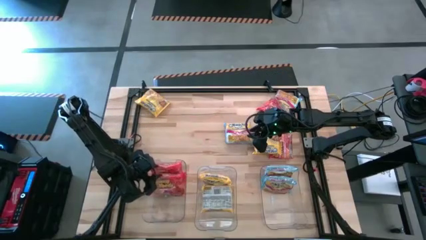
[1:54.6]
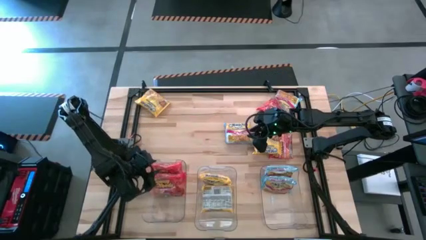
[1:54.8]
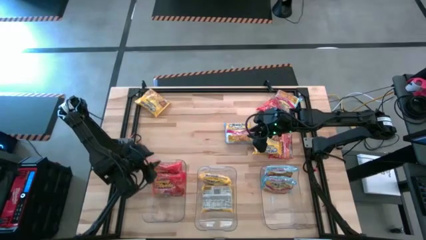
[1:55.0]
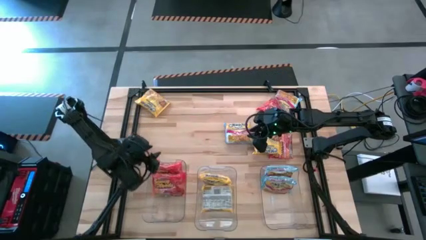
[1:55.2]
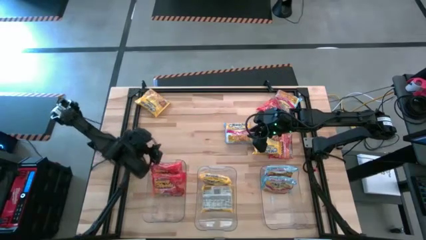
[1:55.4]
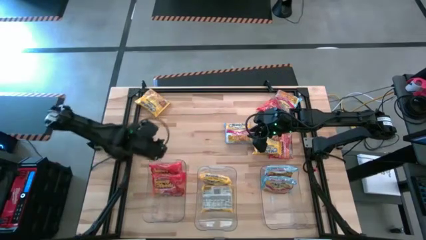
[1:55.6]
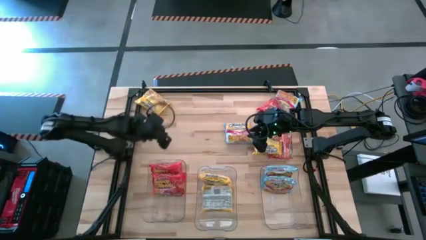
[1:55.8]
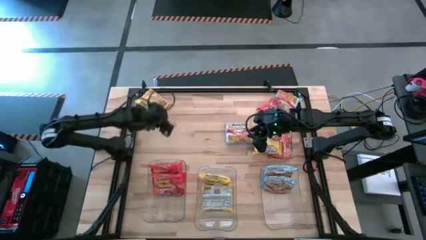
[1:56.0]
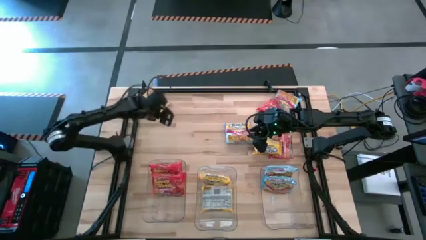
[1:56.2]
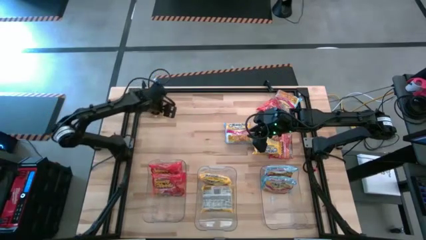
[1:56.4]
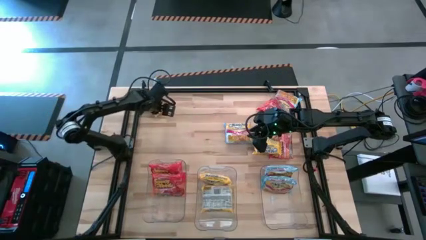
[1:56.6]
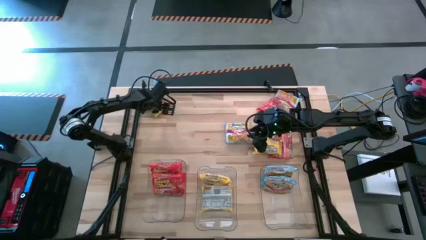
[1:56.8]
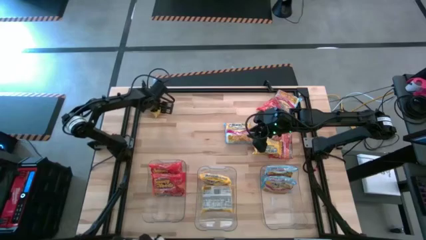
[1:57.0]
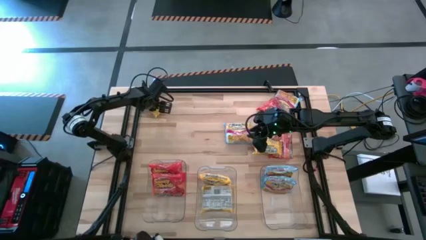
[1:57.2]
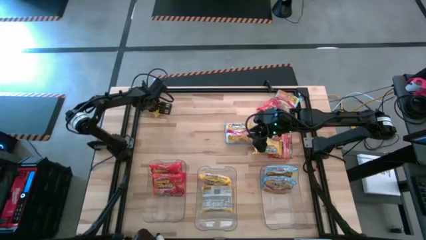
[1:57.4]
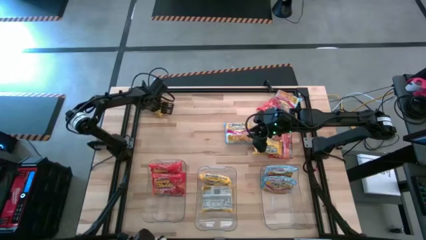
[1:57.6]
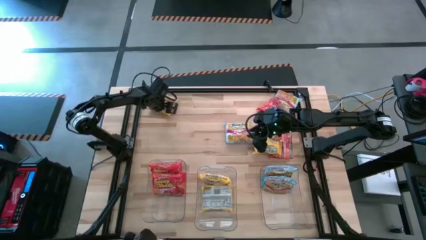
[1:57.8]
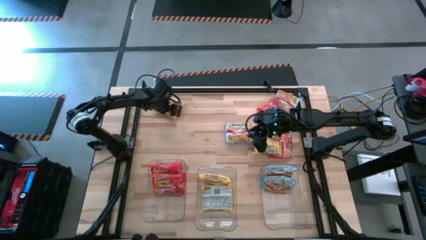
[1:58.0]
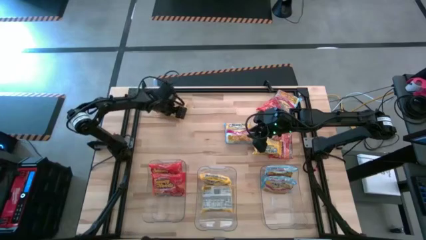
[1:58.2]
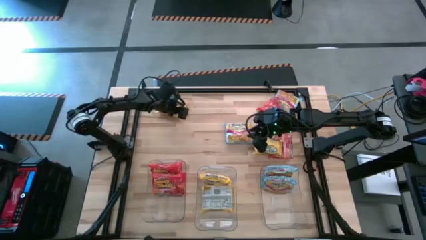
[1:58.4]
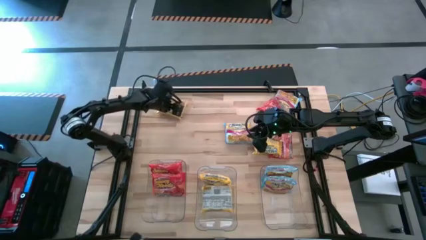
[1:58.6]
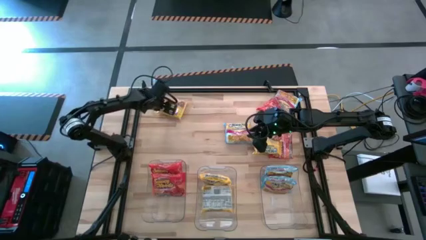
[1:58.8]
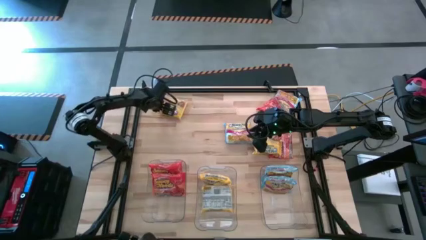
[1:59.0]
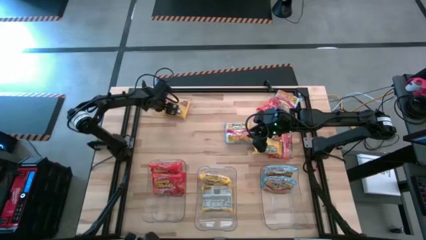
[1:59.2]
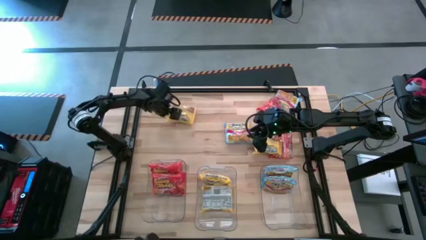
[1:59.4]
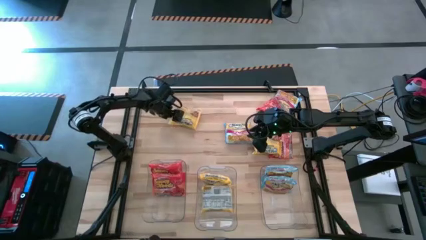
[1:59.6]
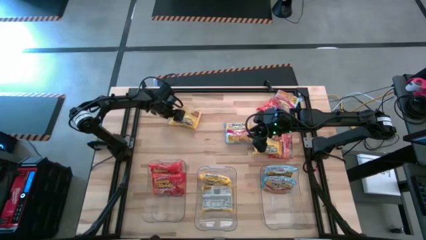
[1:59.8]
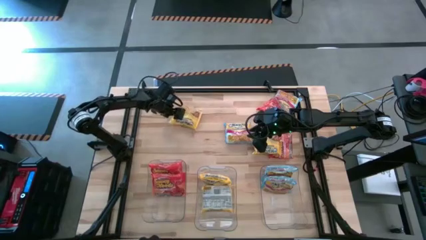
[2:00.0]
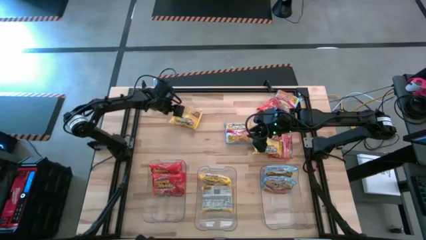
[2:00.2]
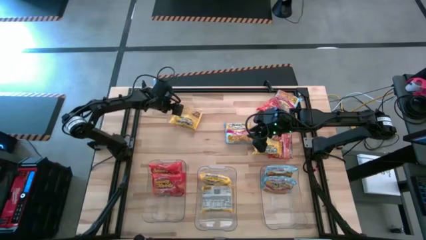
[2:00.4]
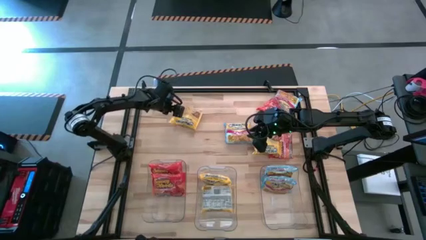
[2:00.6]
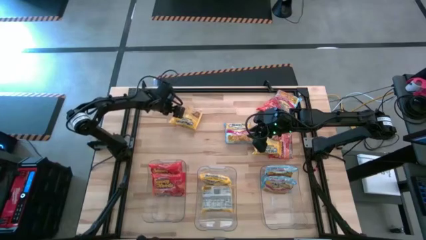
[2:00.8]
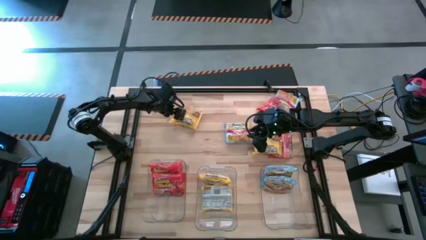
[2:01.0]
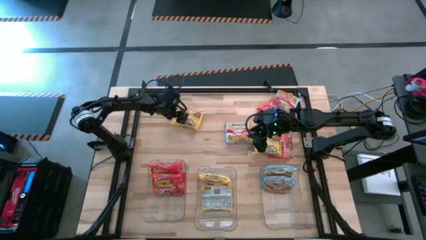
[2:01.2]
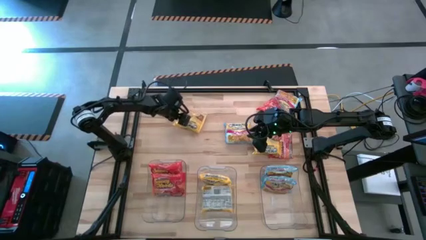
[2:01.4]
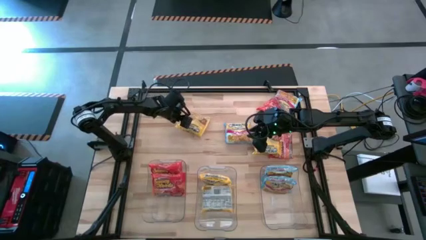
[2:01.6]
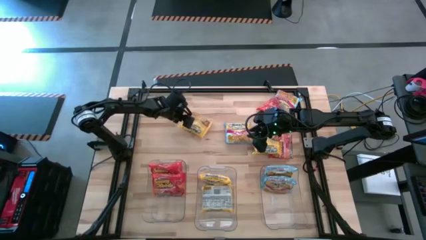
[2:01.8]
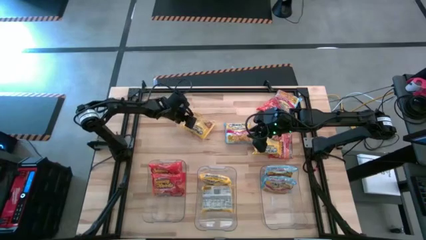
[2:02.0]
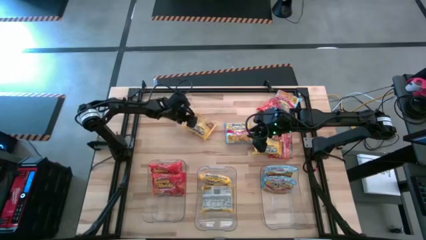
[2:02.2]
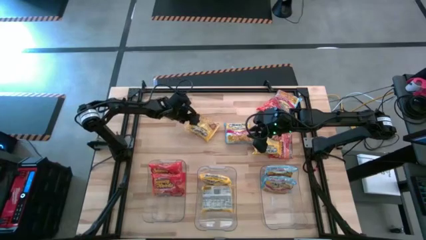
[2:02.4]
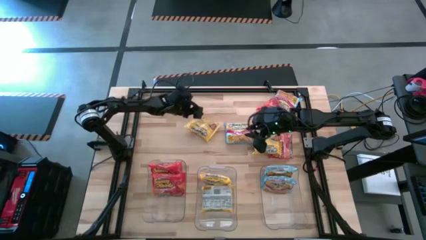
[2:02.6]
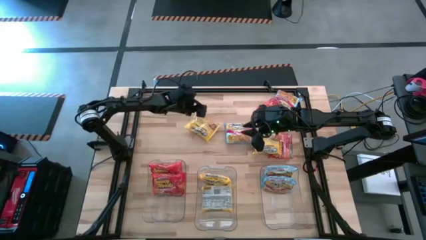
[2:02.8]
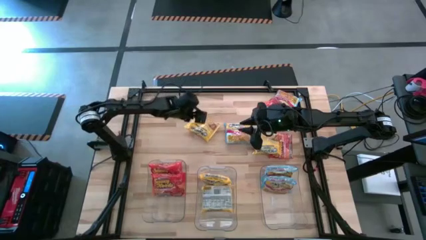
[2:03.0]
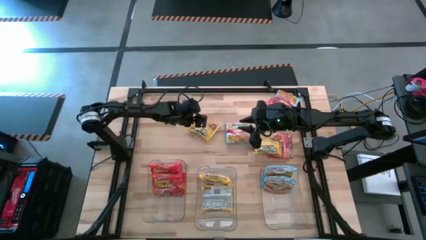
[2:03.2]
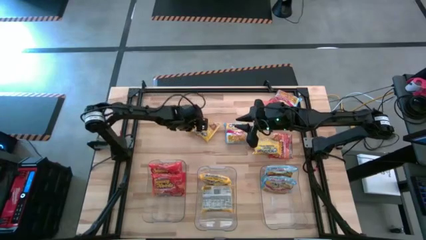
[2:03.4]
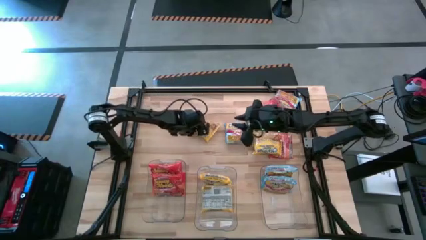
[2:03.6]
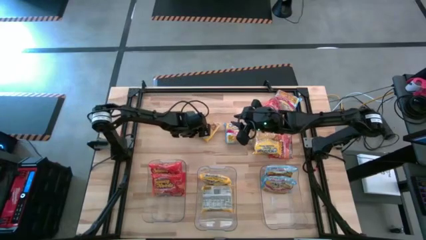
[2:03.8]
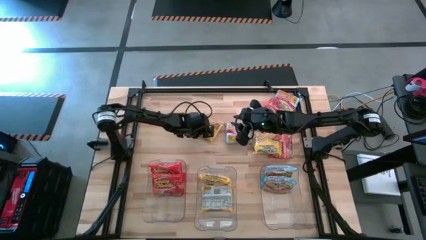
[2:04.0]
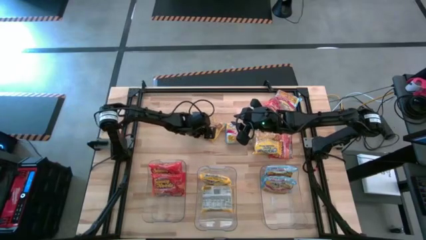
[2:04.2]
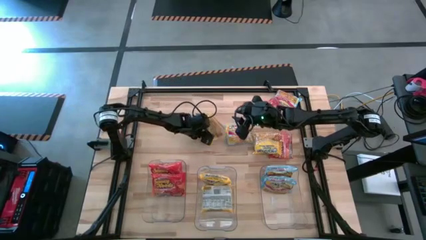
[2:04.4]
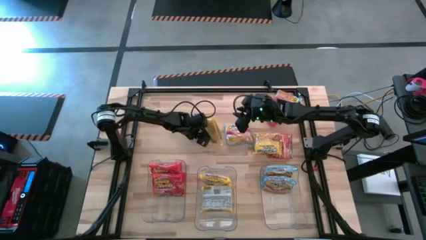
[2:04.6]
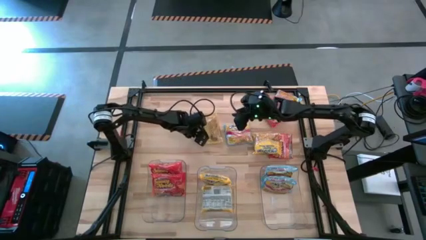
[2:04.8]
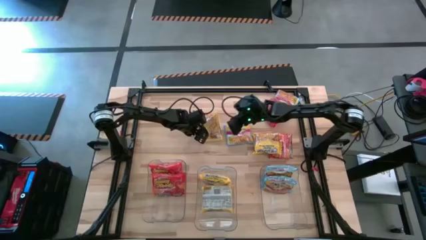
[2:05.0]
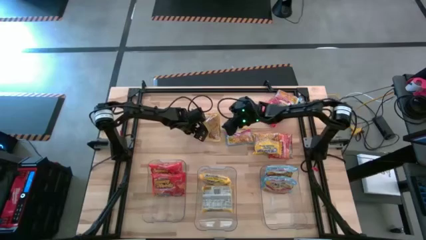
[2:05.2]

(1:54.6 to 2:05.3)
Task: Sort Maruchan noodles
Put the yellow noodle pack into the middle transparent bin

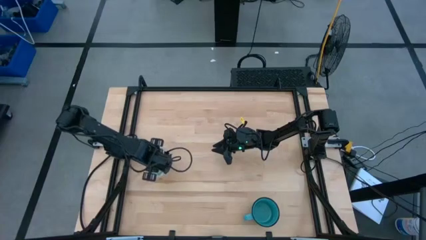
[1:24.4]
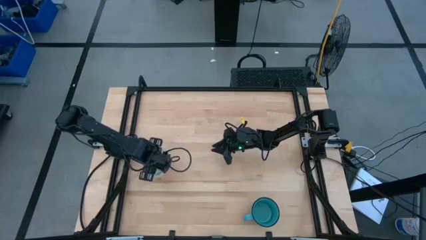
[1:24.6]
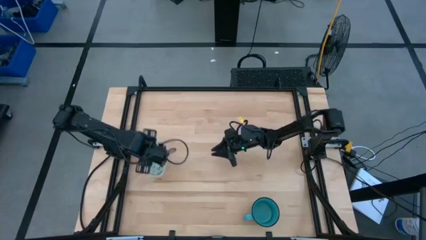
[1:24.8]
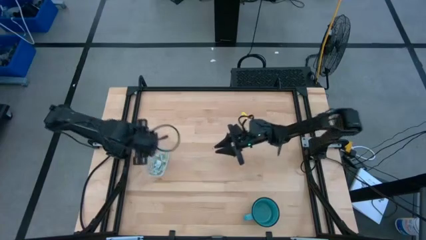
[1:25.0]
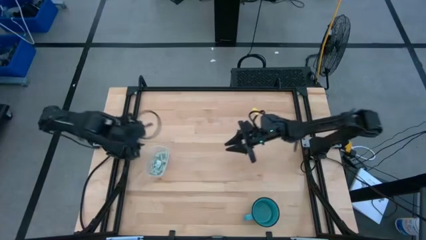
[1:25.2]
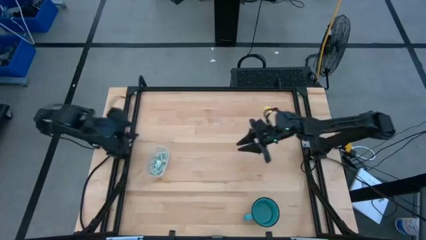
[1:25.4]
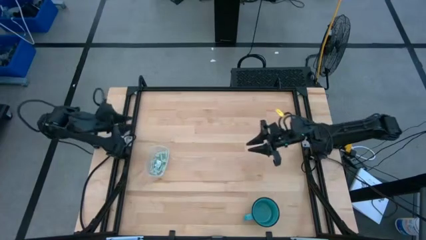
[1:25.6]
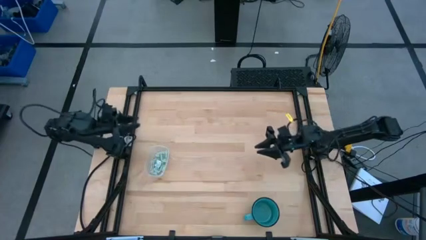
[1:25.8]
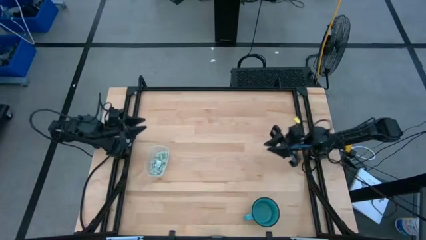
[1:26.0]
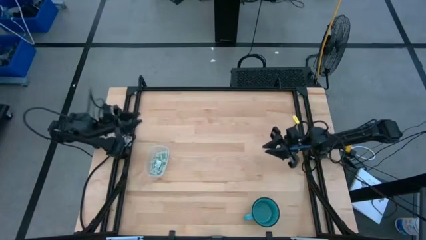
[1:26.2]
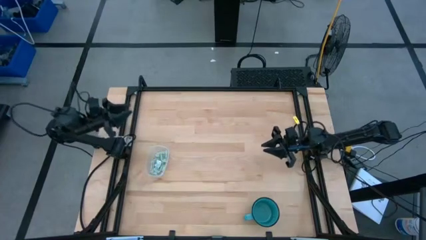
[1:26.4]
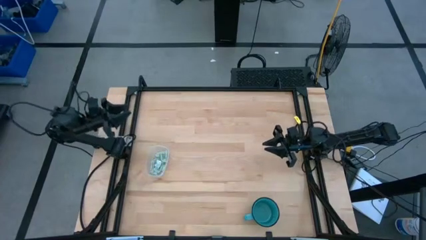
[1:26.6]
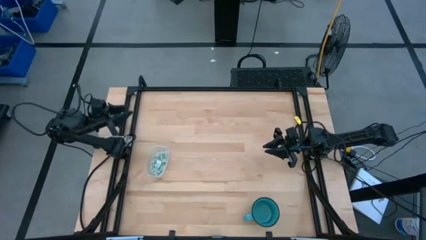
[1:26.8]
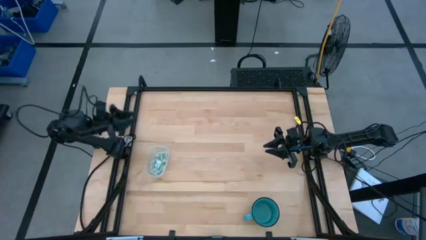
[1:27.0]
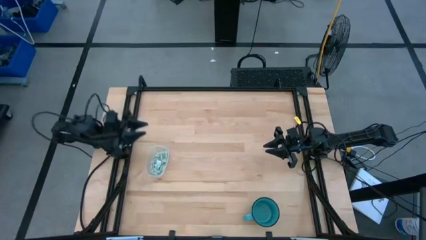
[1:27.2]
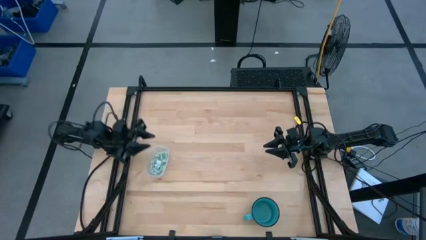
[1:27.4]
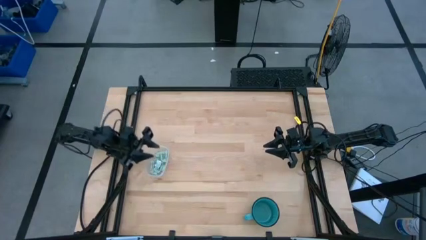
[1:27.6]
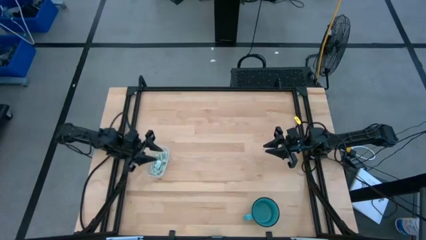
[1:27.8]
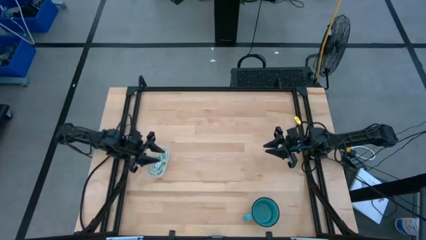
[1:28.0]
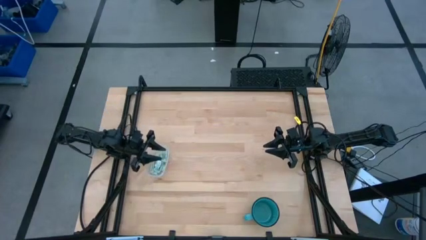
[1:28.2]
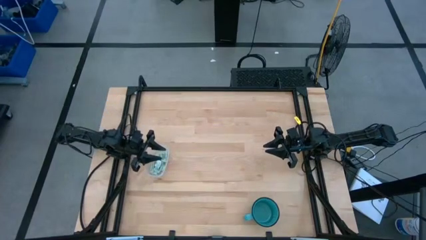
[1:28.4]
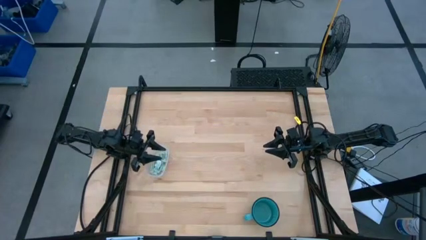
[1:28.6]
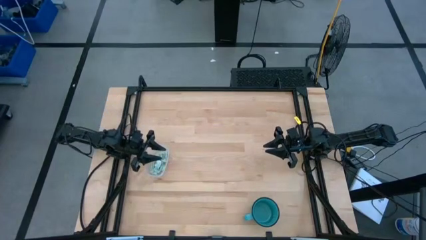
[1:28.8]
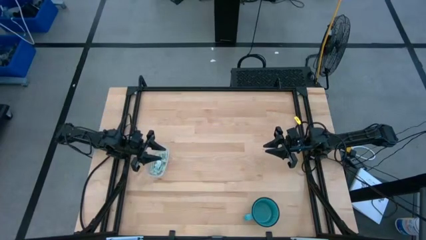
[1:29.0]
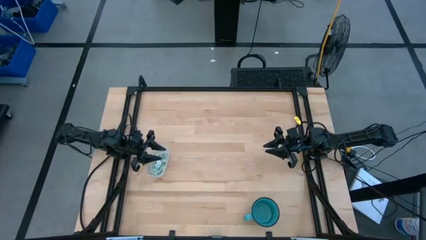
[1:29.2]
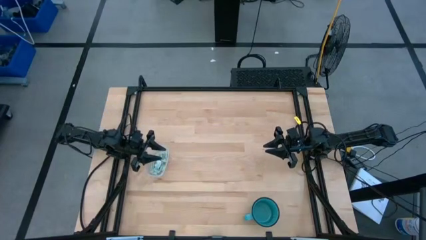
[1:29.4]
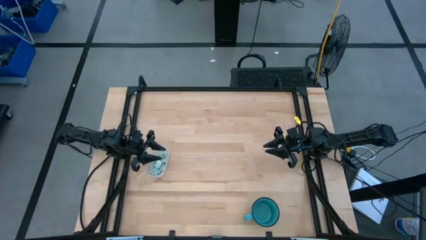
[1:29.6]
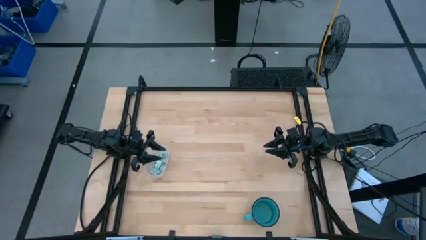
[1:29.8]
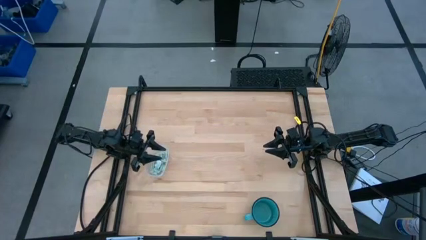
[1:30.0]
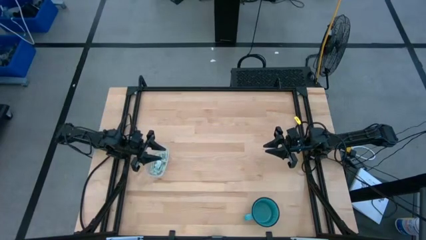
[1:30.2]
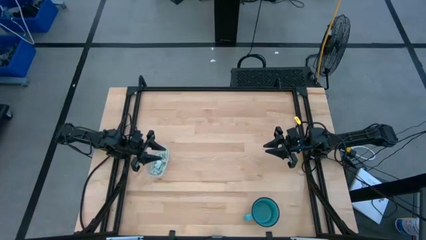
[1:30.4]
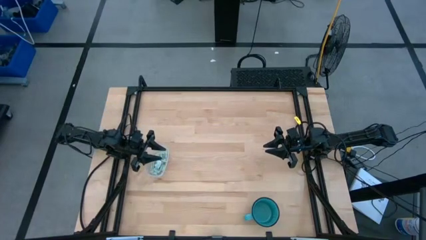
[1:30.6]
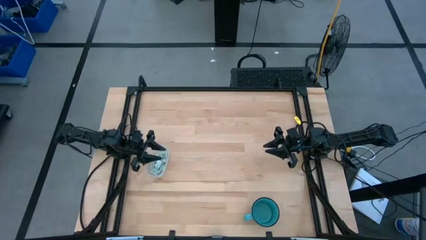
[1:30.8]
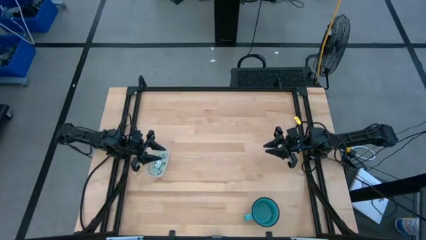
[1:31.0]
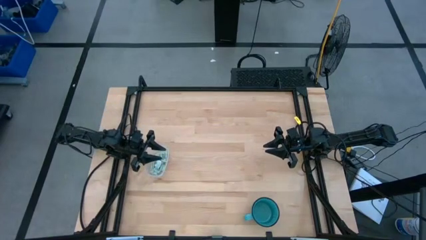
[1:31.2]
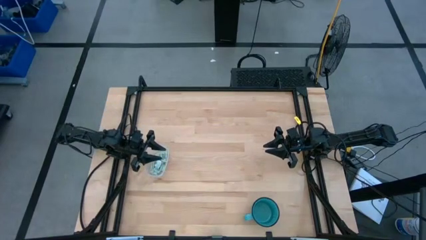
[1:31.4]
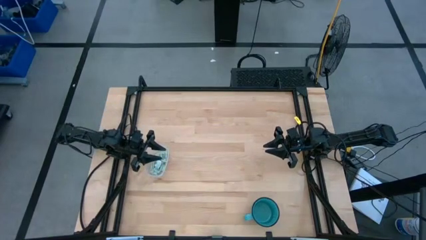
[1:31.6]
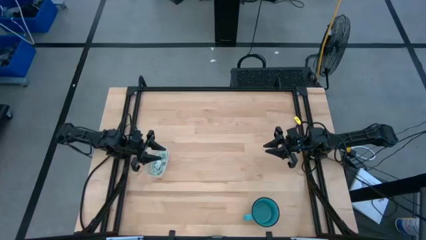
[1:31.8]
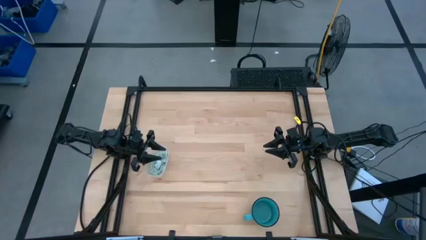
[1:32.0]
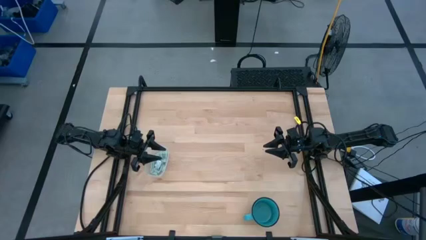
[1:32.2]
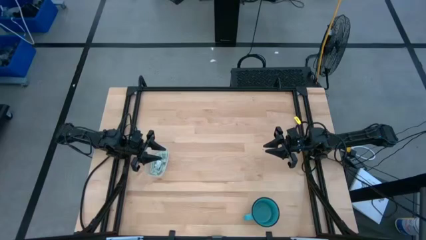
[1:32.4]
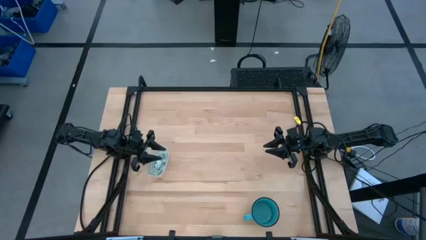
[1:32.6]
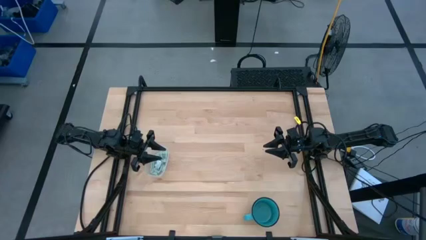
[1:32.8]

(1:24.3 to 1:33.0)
Task: Pick and place Stevia / Truvia into bins
Return to Home Position
